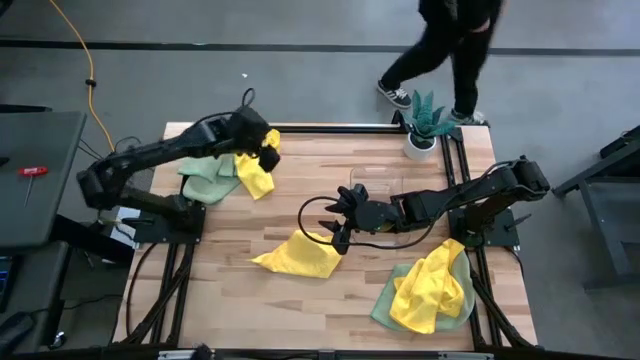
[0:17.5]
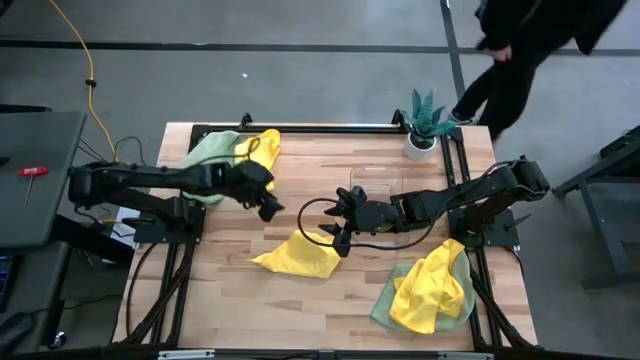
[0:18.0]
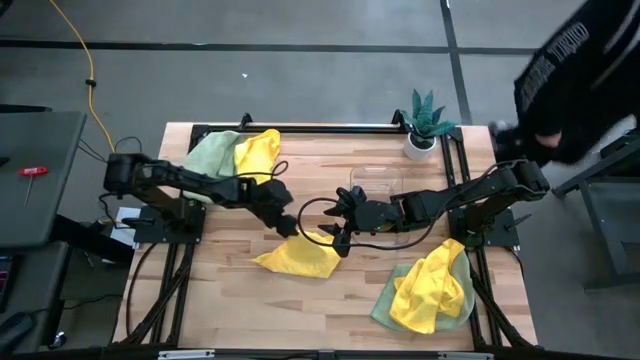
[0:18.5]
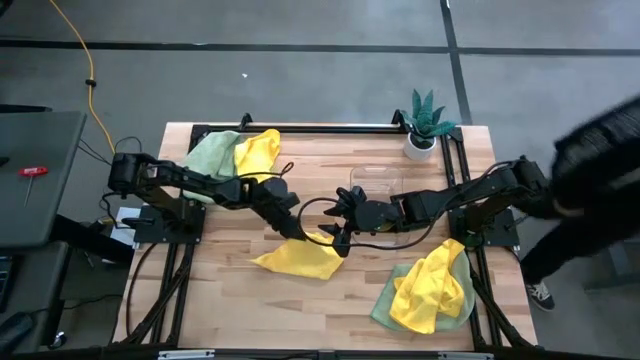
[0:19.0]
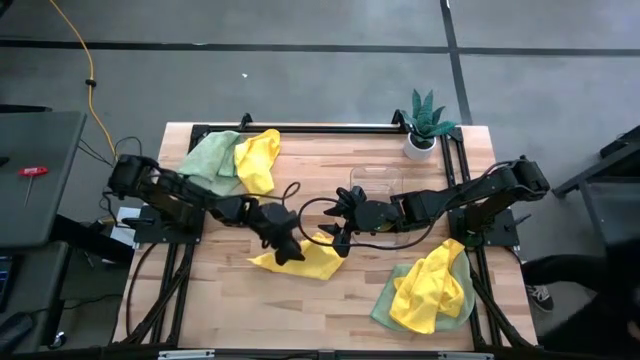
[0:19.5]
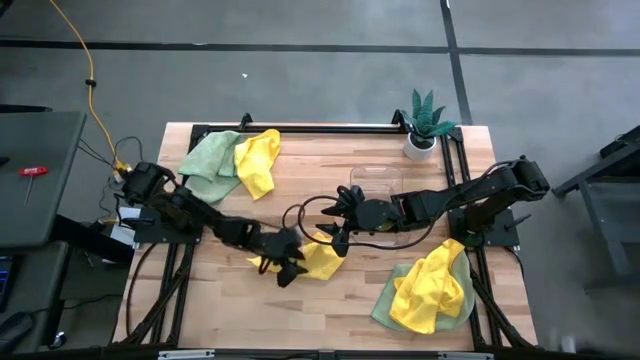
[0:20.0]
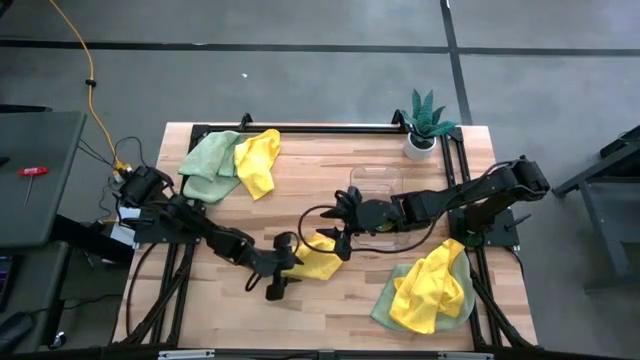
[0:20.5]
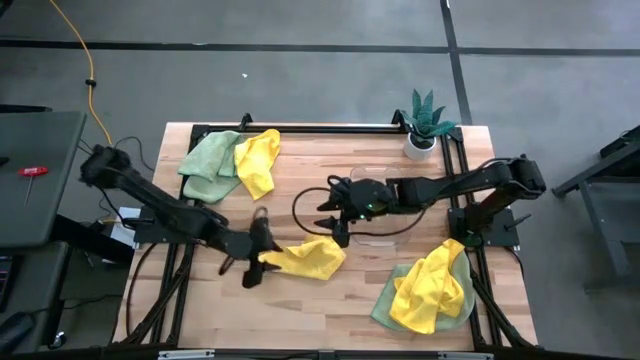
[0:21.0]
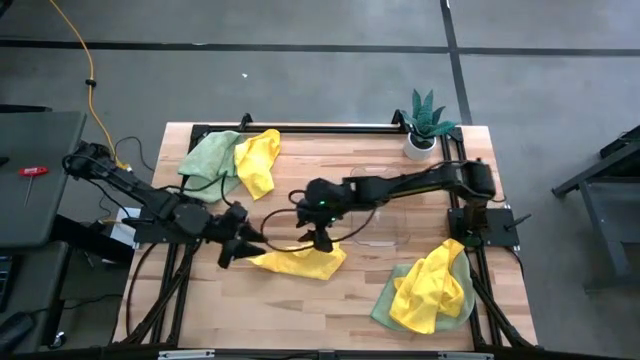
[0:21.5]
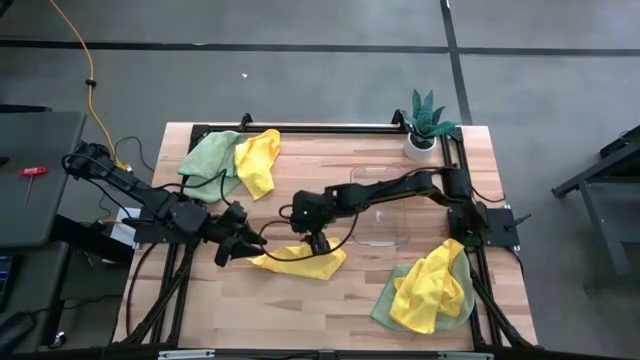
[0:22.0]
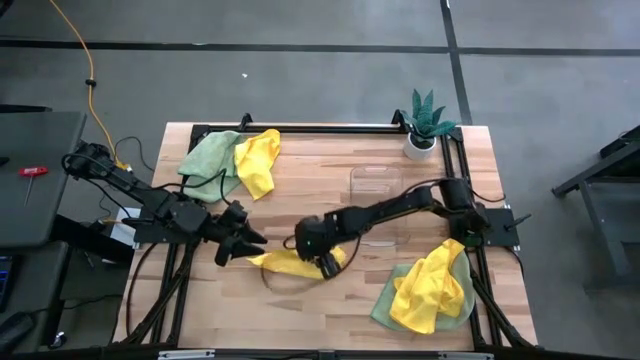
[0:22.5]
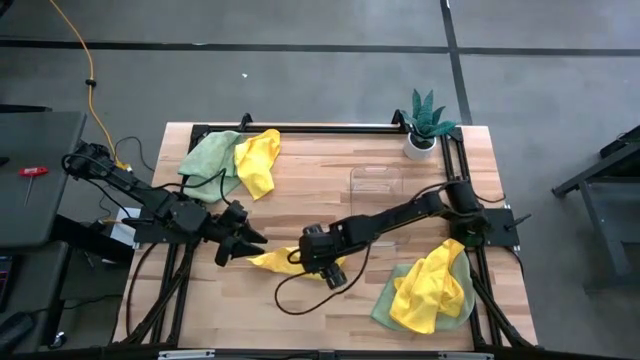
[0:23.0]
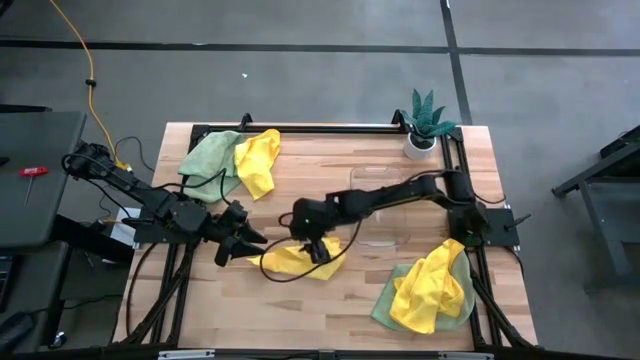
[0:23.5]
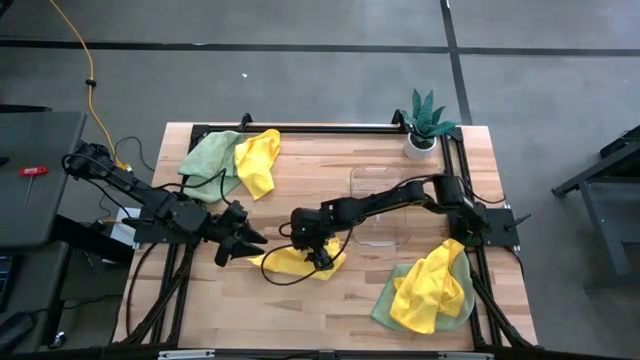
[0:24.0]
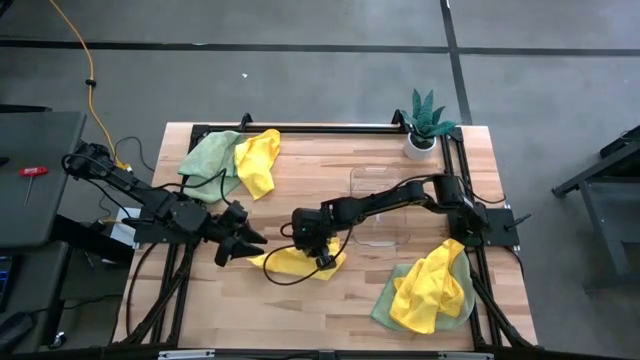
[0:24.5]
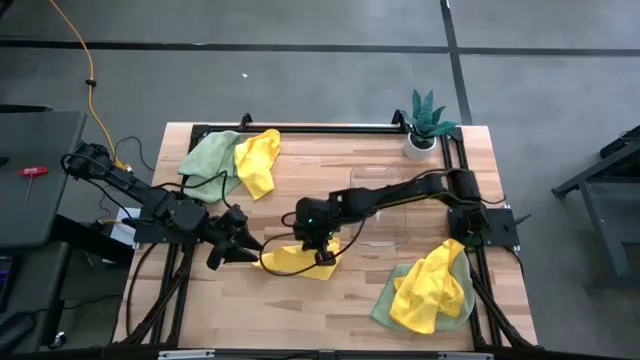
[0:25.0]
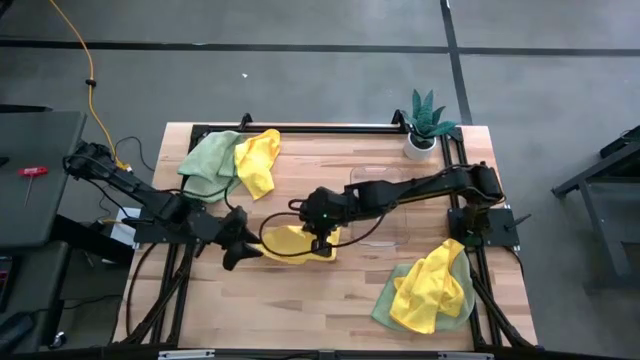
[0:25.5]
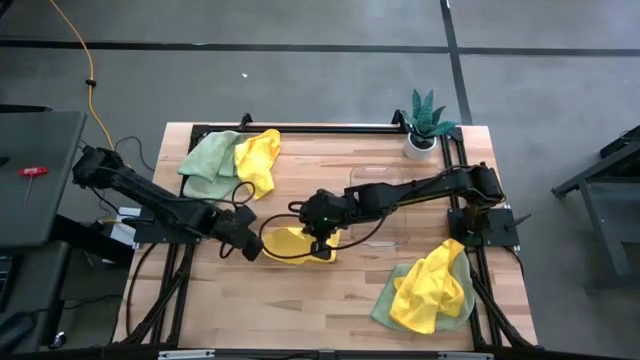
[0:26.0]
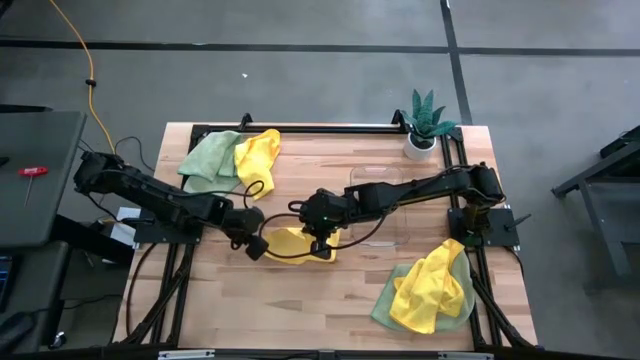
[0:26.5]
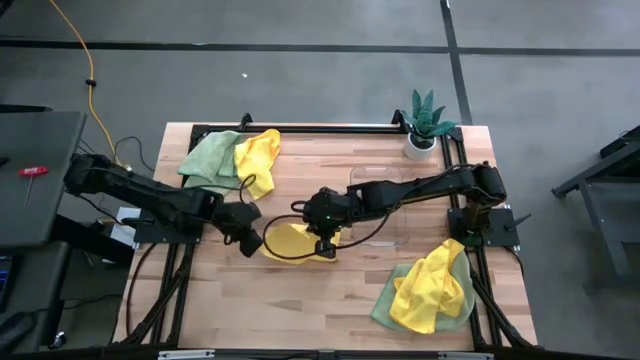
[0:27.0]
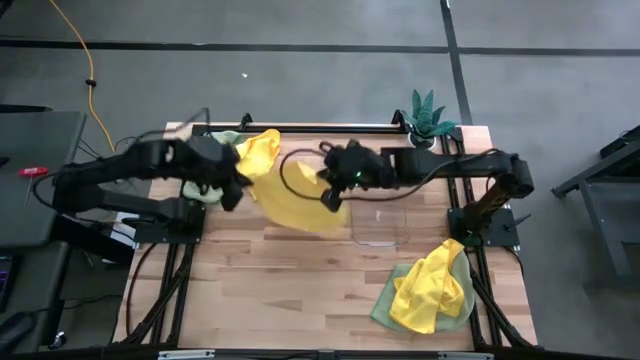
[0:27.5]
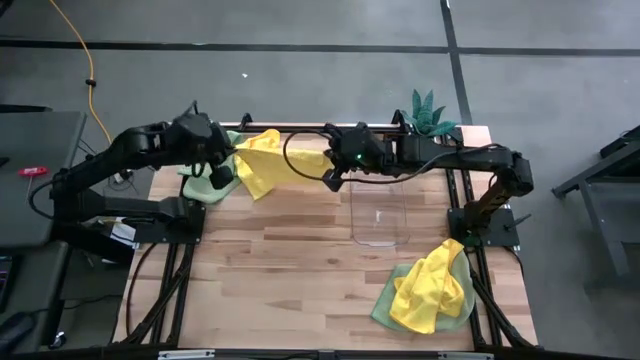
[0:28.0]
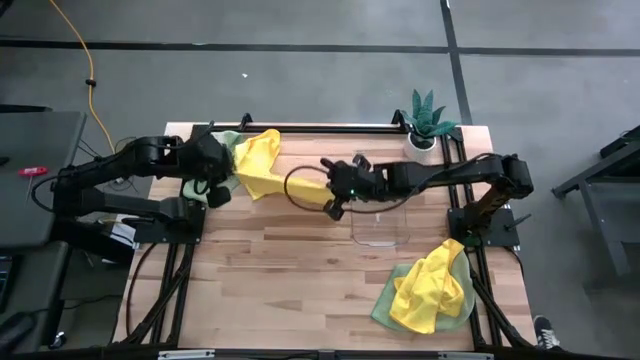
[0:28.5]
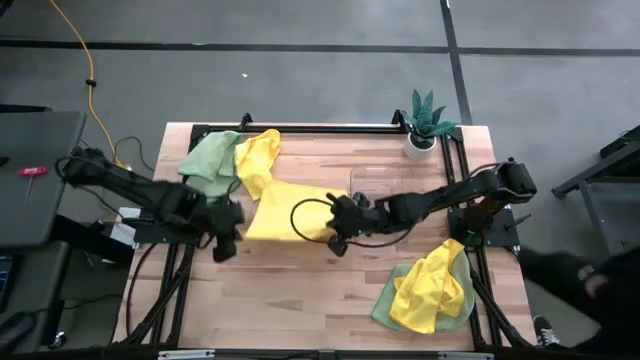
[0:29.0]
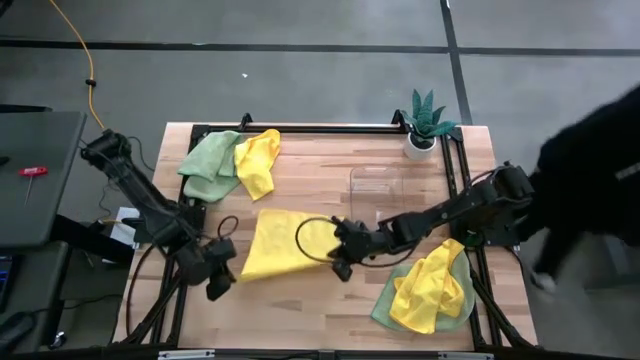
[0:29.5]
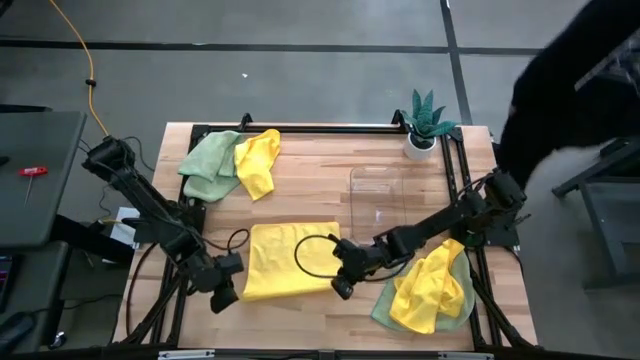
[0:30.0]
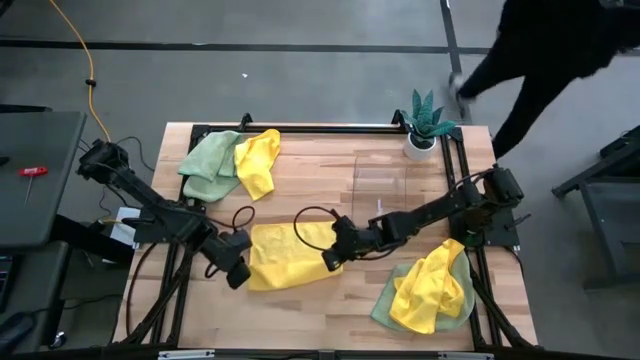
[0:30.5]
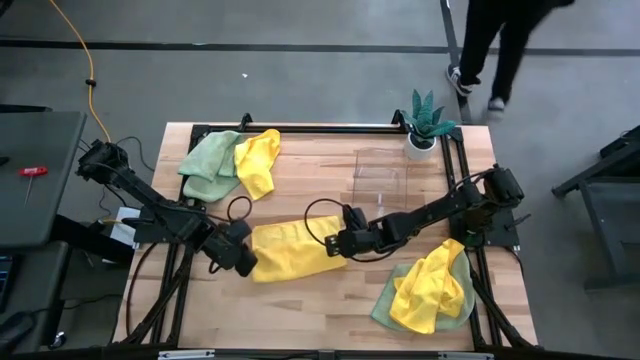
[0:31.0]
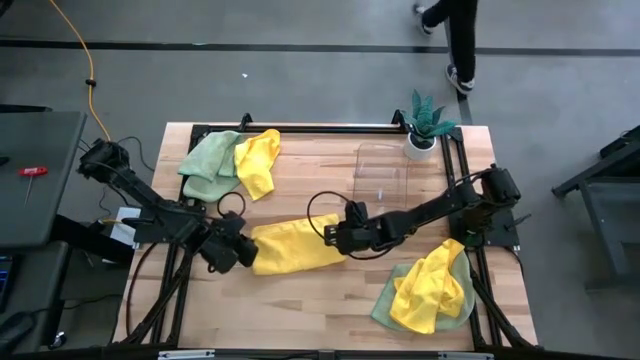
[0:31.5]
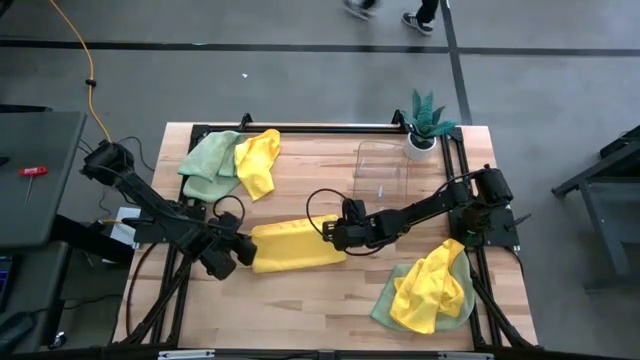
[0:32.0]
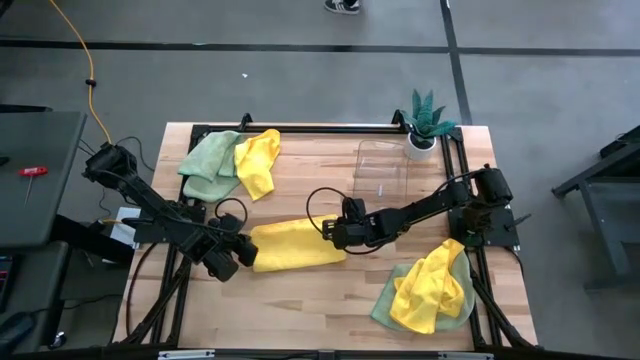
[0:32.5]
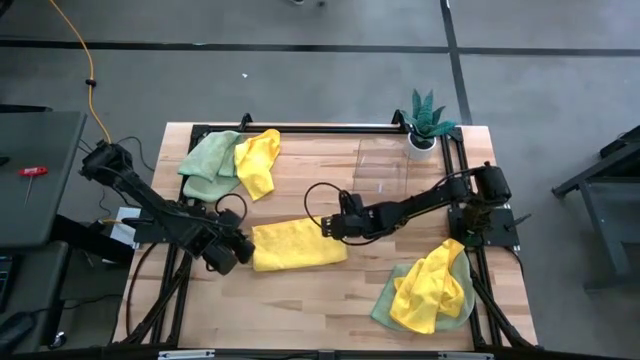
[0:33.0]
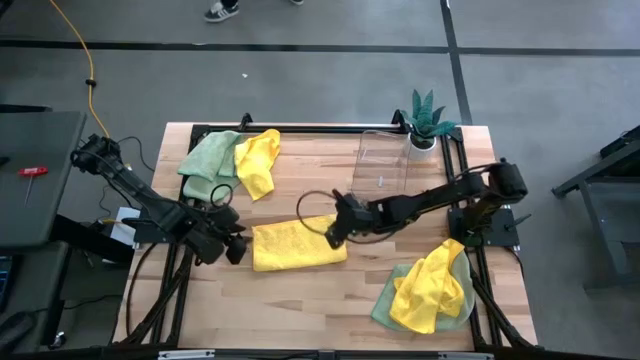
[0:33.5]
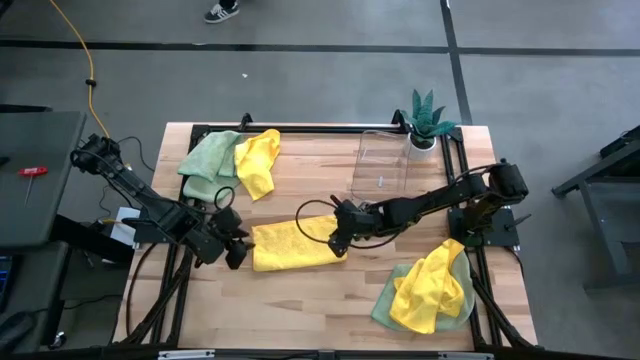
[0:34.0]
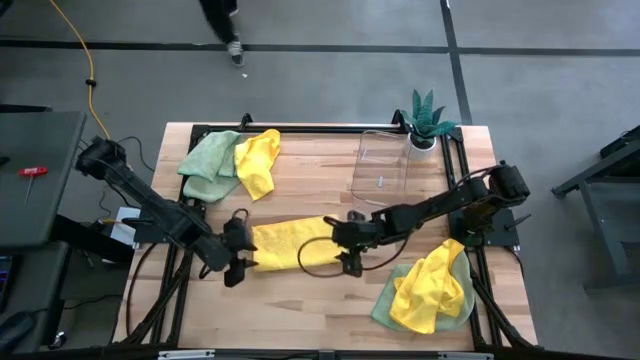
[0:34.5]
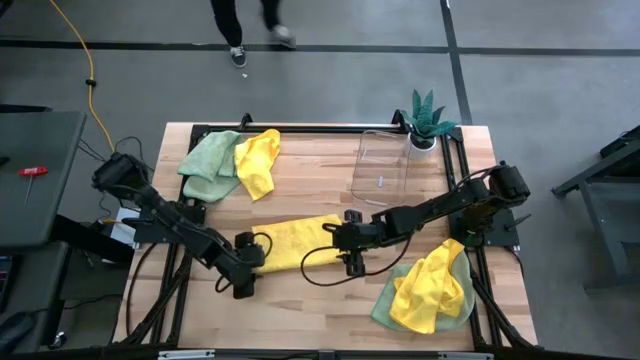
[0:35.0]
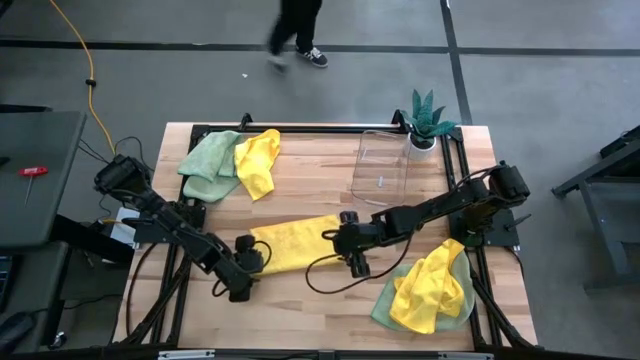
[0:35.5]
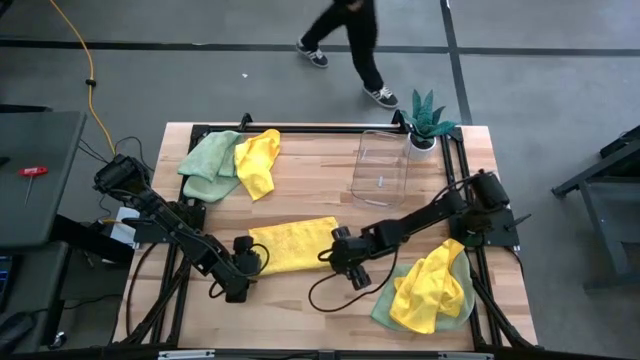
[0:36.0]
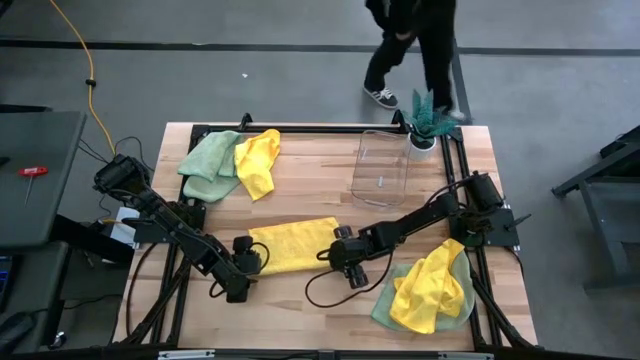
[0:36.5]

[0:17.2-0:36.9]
Task: Fold microfiber towels
Fold the middle yellow microfiber towel
